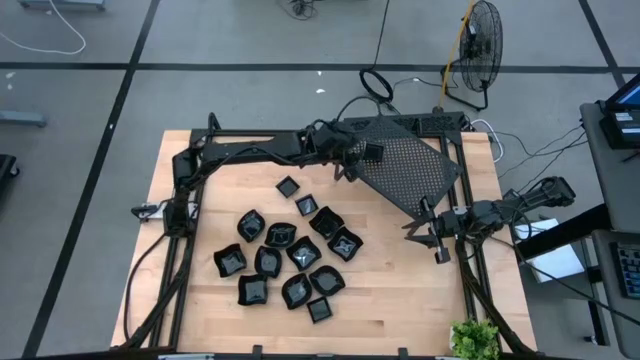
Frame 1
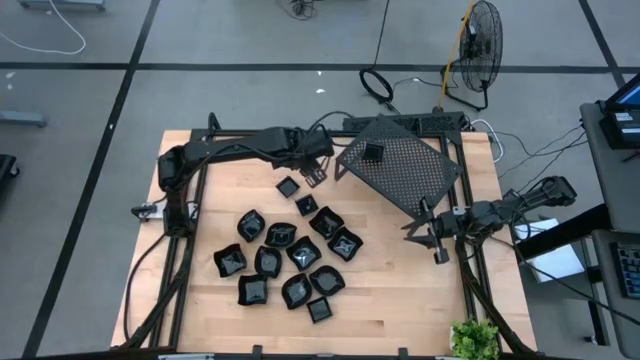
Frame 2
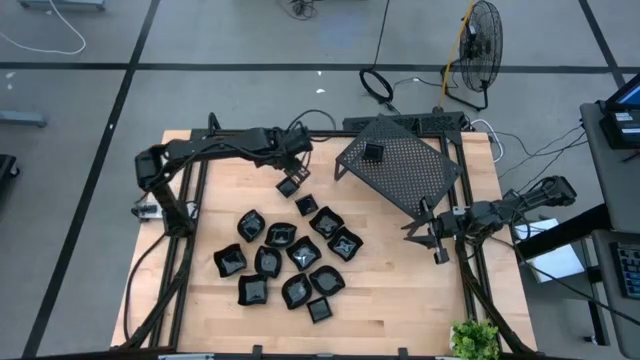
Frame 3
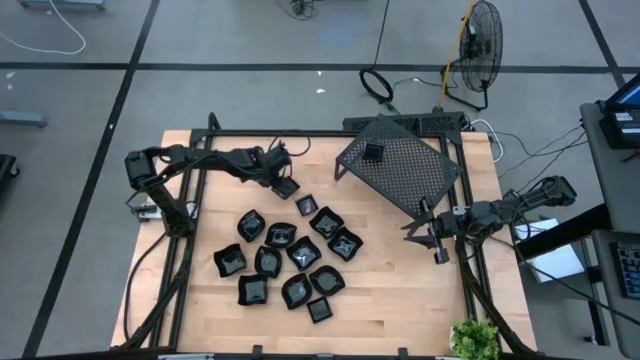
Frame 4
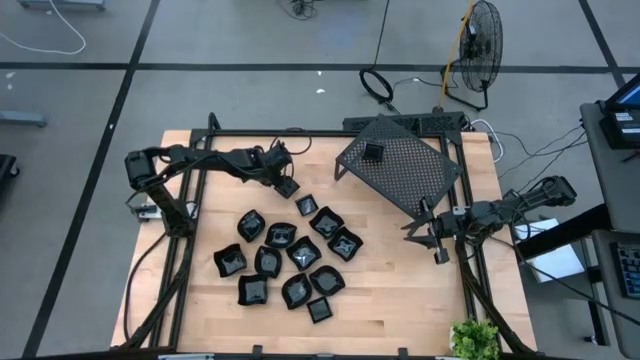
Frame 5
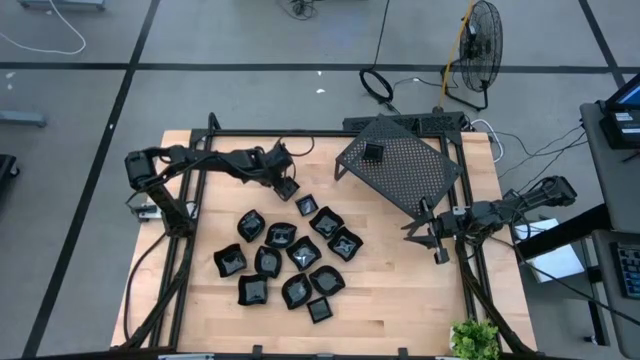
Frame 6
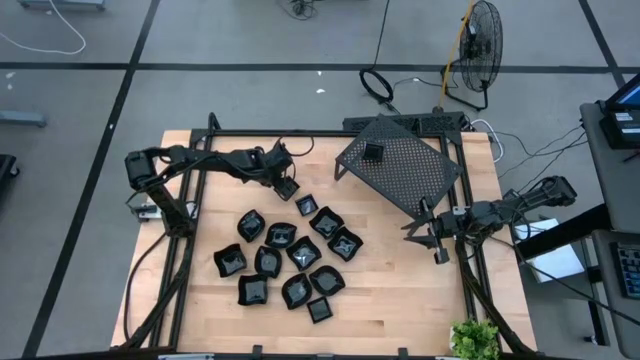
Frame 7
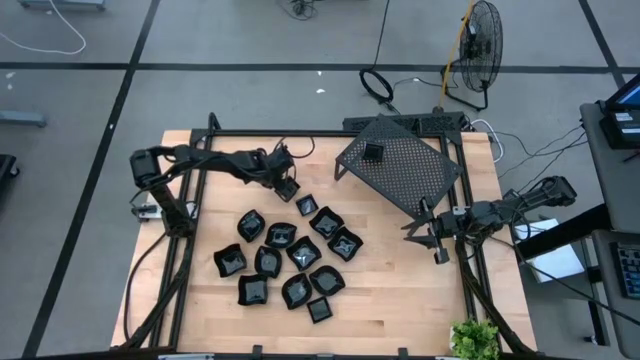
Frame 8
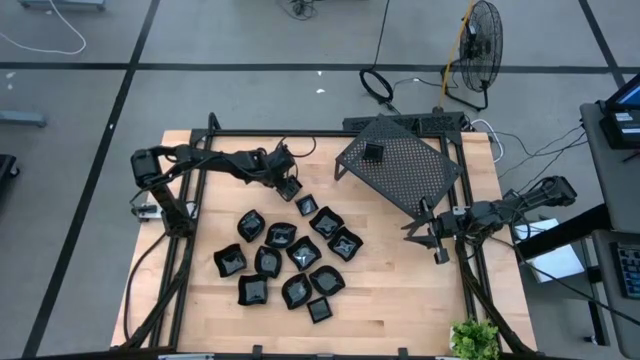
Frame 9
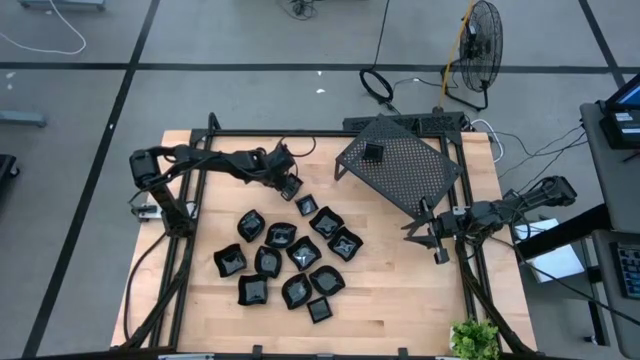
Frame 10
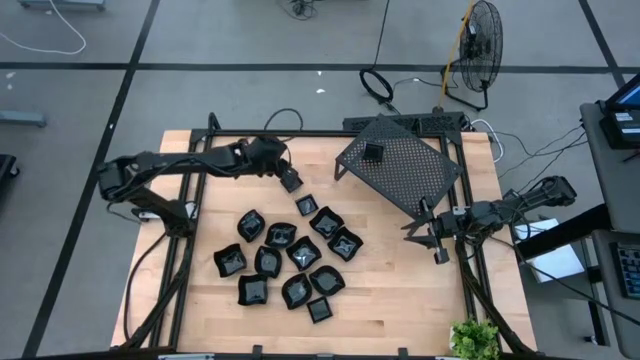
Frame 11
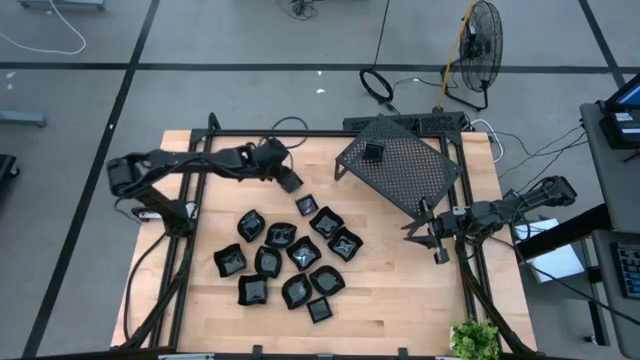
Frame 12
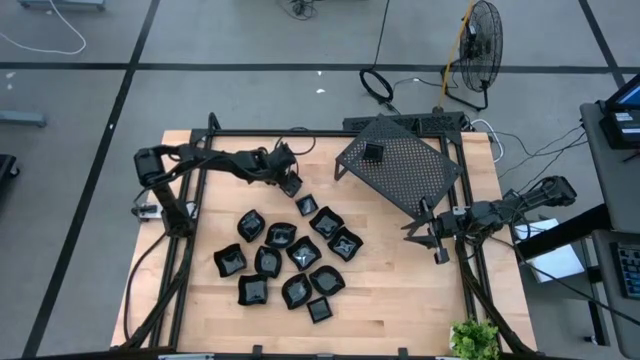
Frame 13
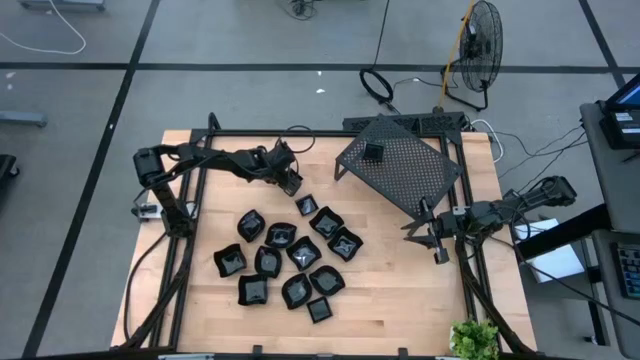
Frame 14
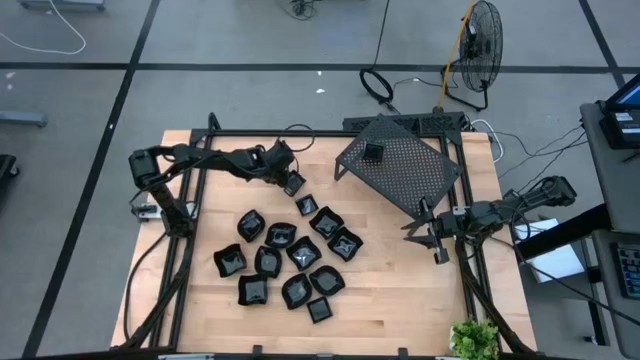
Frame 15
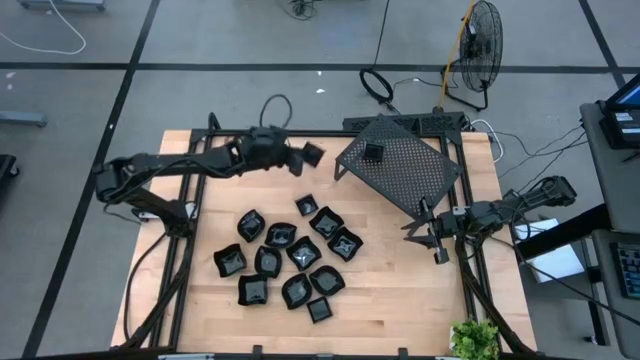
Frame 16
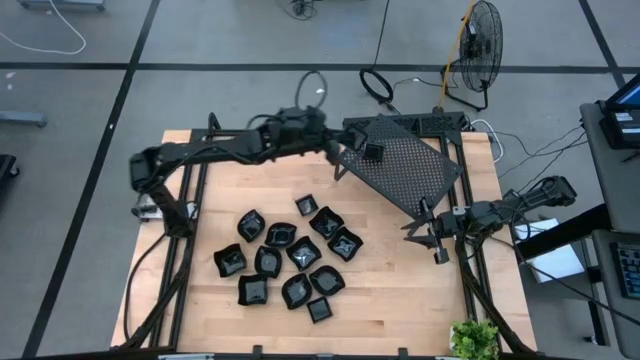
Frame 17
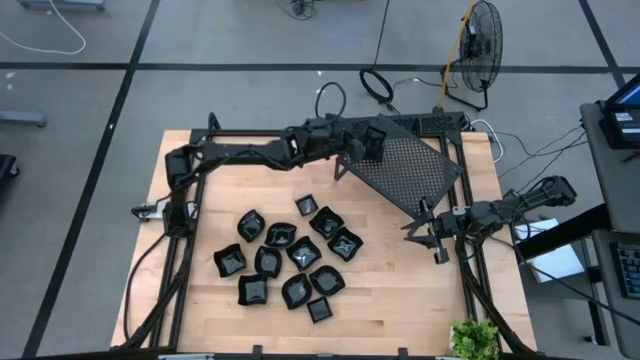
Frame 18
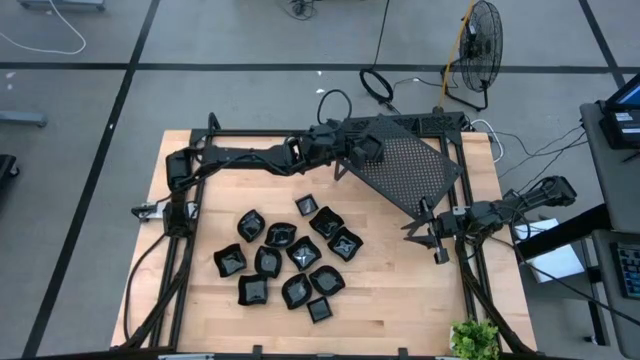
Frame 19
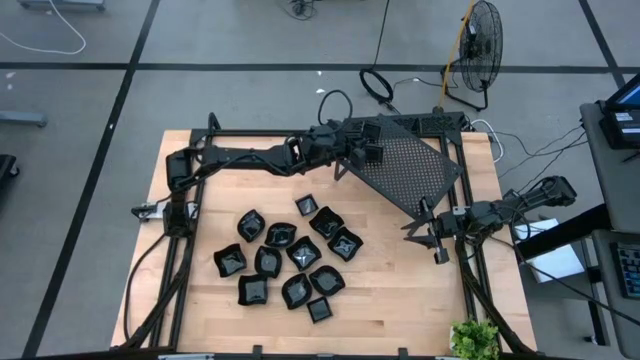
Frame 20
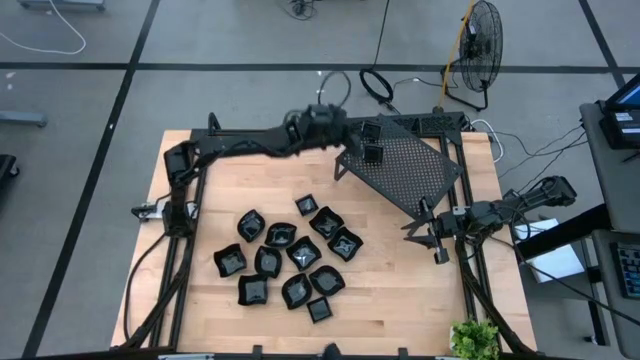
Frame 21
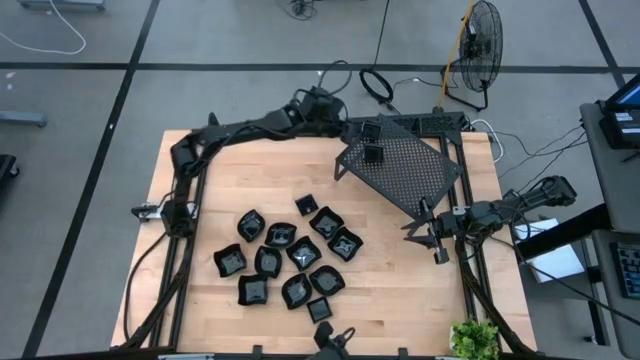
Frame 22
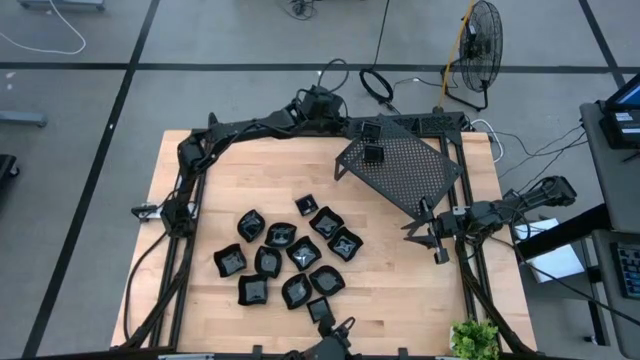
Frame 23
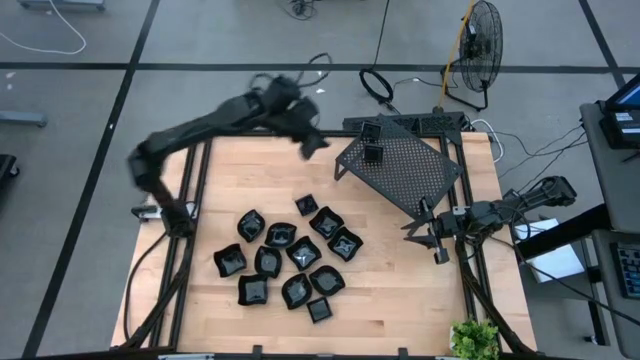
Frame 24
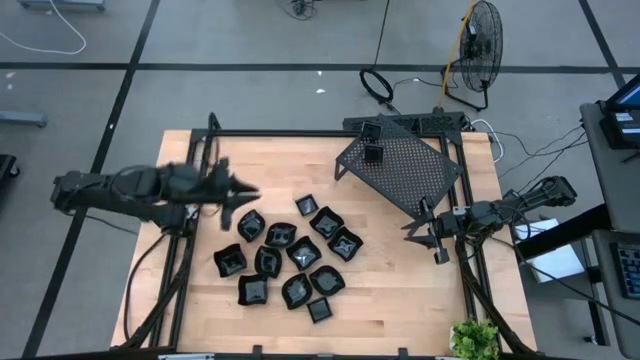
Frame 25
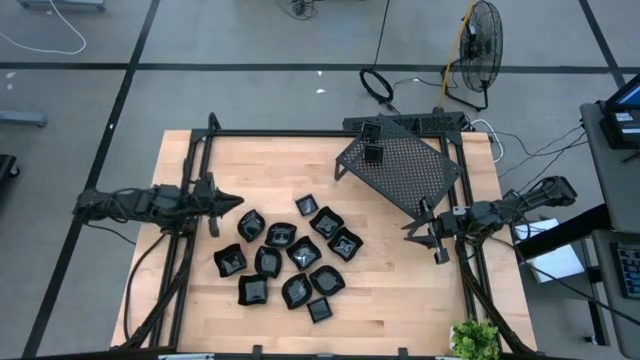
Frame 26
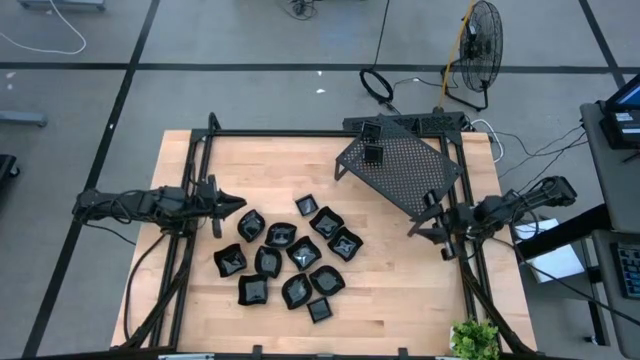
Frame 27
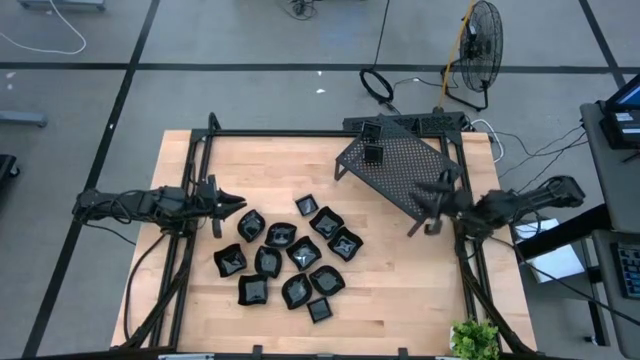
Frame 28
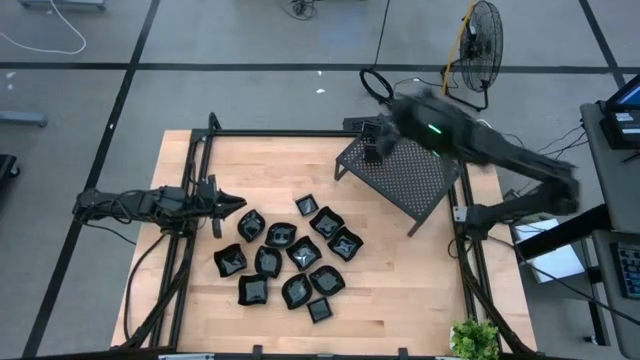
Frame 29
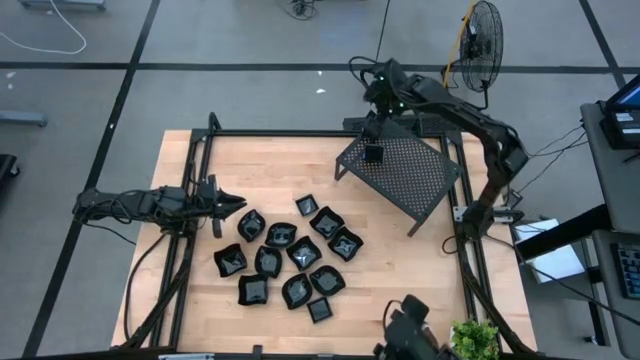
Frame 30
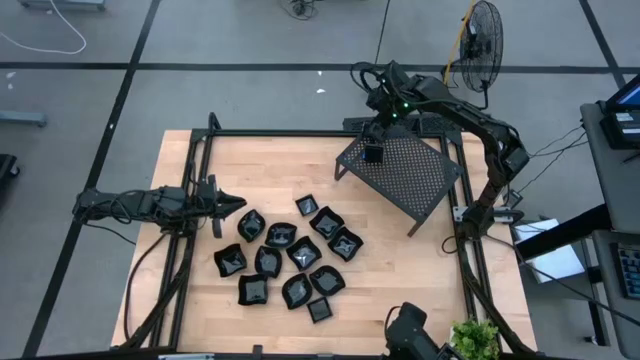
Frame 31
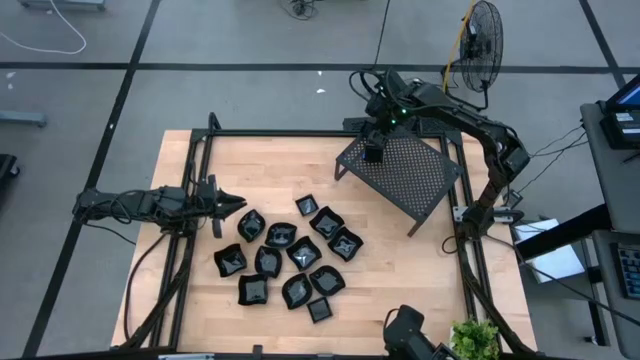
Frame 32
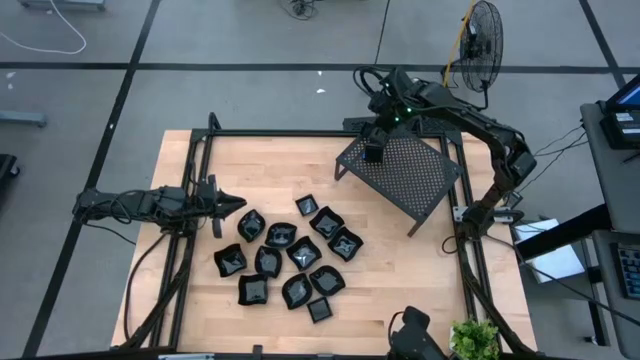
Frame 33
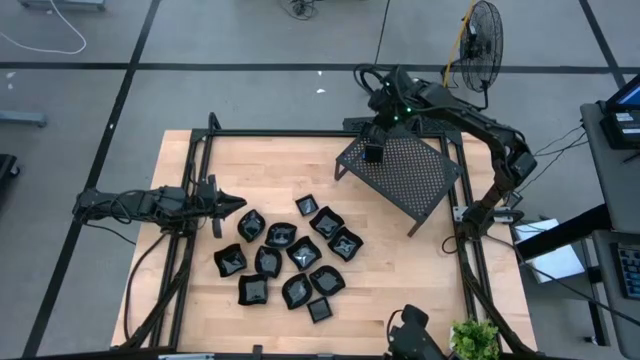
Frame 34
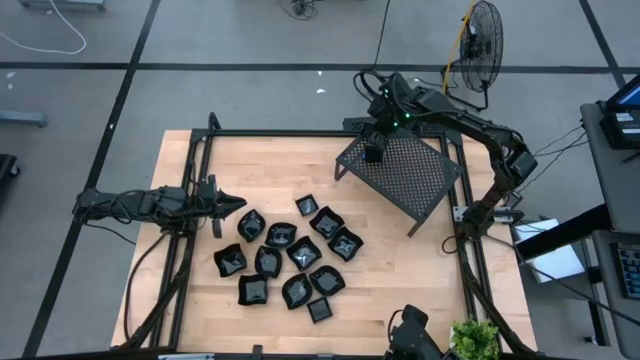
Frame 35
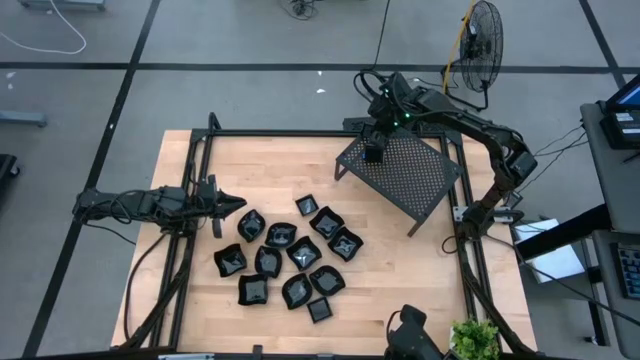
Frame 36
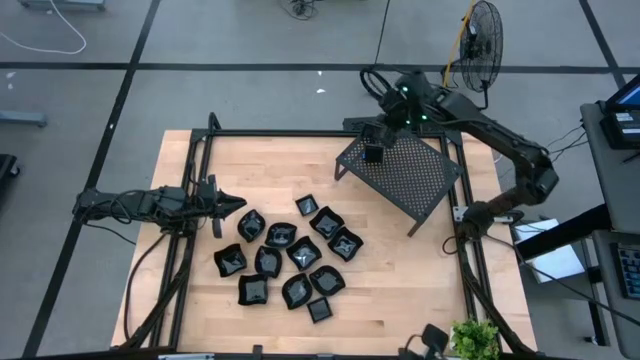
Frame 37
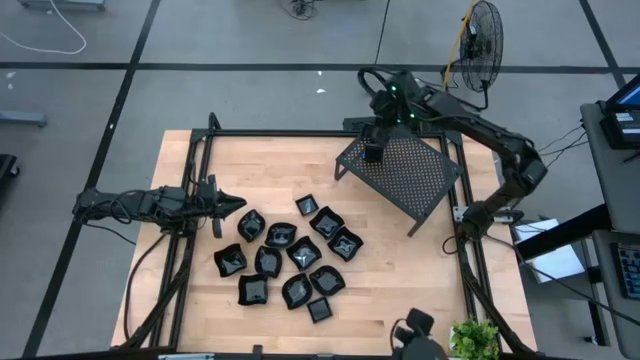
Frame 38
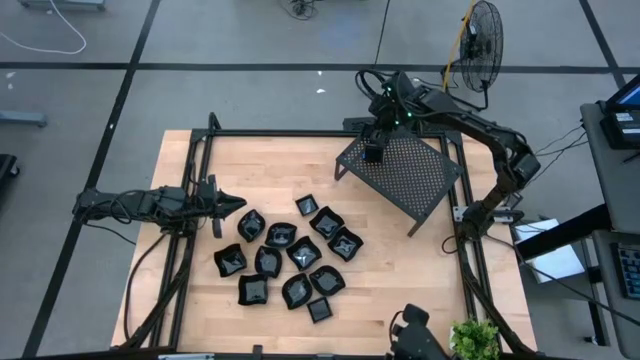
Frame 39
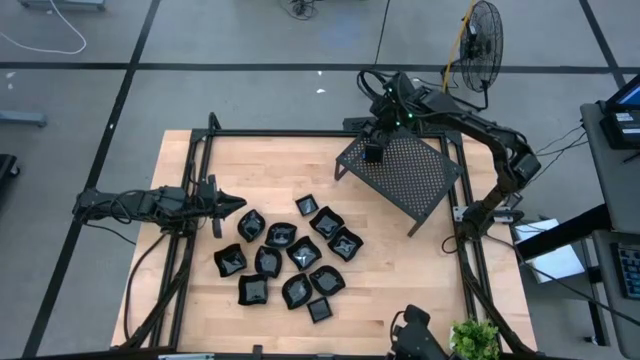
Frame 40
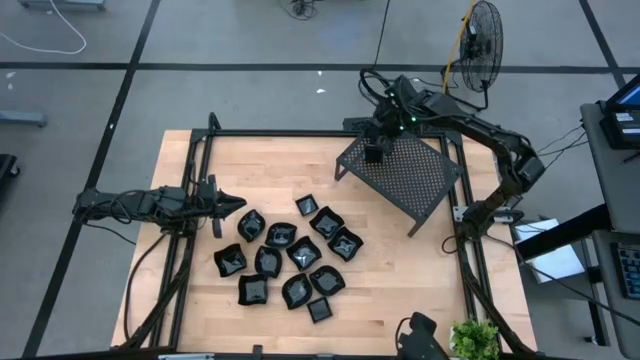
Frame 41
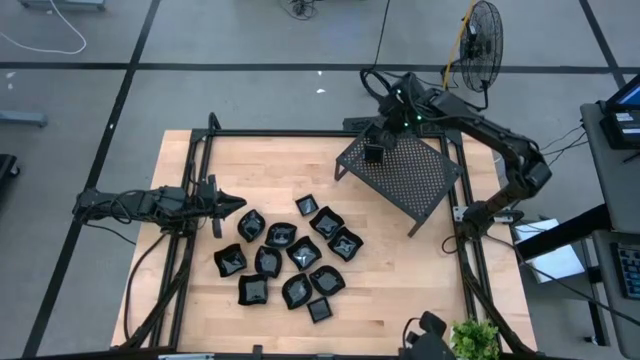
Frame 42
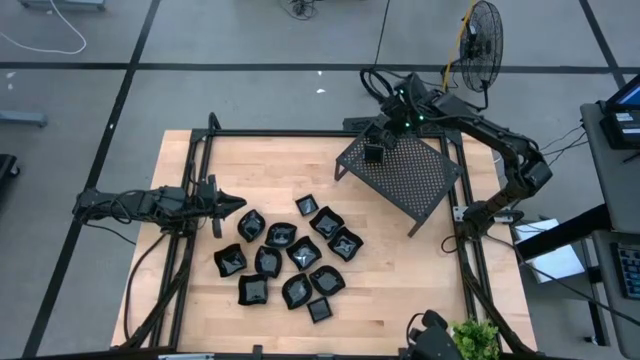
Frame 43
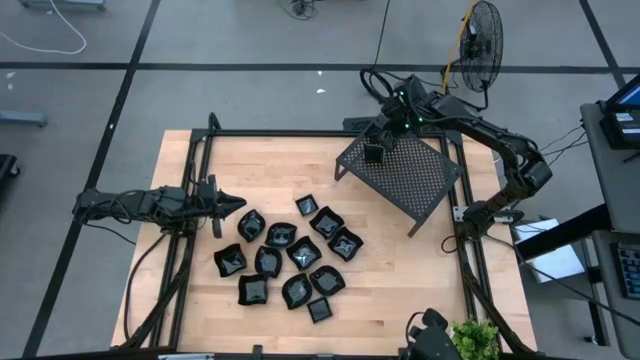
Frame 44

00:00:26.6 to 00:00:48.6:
Task: Pick & Place Mini shaped plates
Stack the black square plate on the square black plate on the shelf
